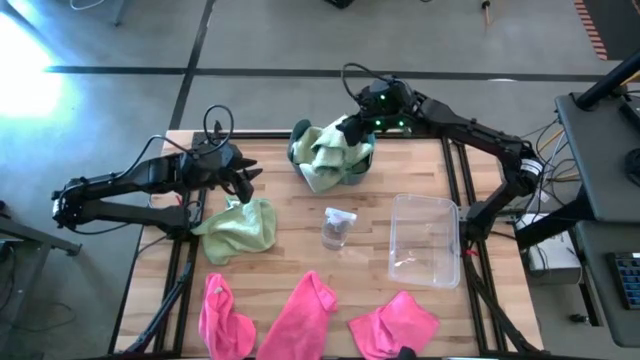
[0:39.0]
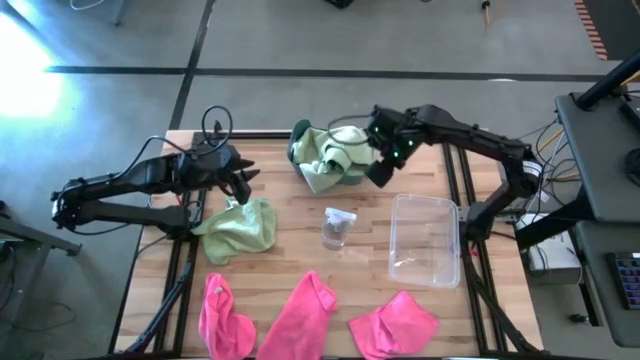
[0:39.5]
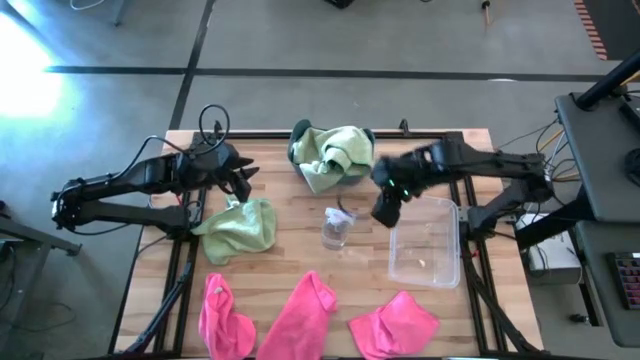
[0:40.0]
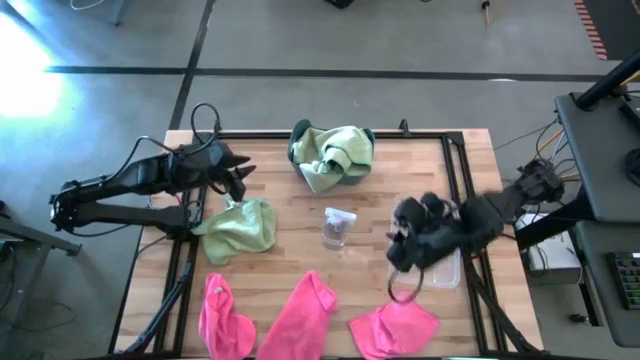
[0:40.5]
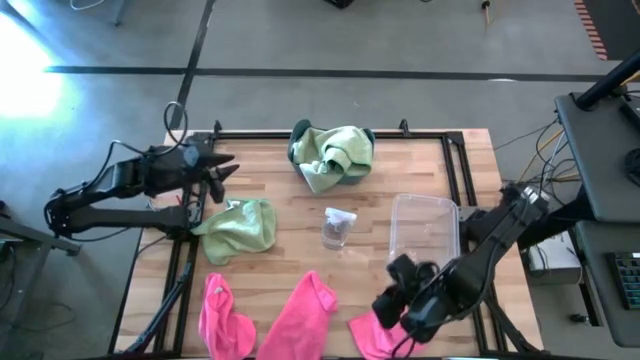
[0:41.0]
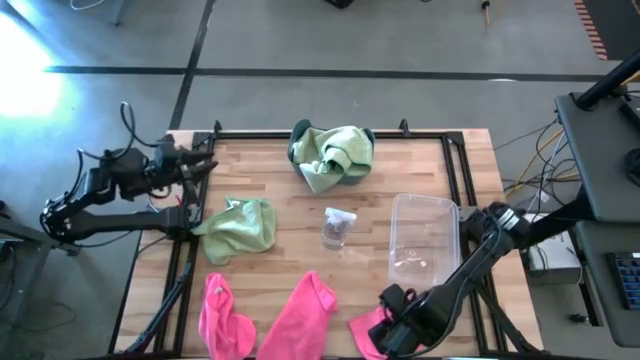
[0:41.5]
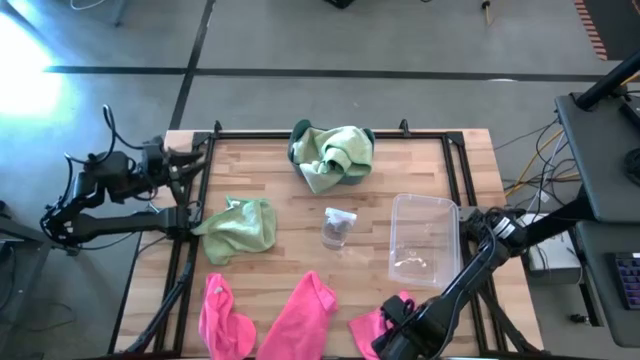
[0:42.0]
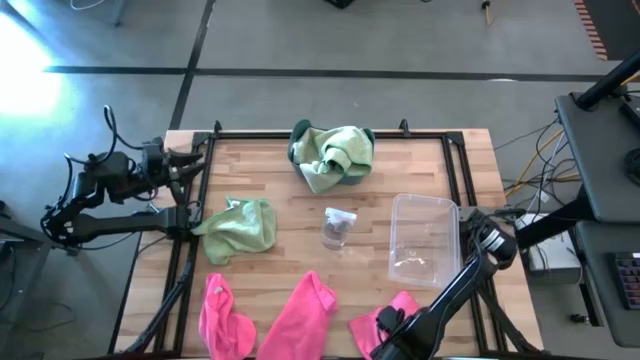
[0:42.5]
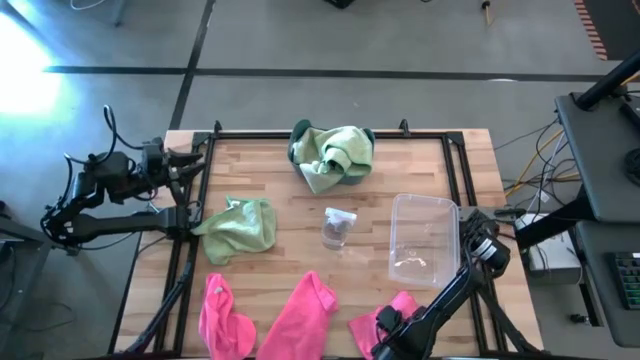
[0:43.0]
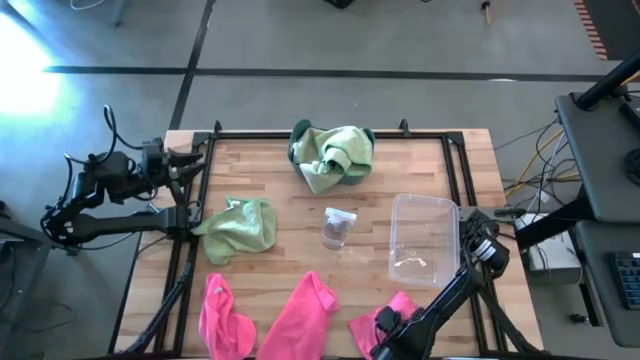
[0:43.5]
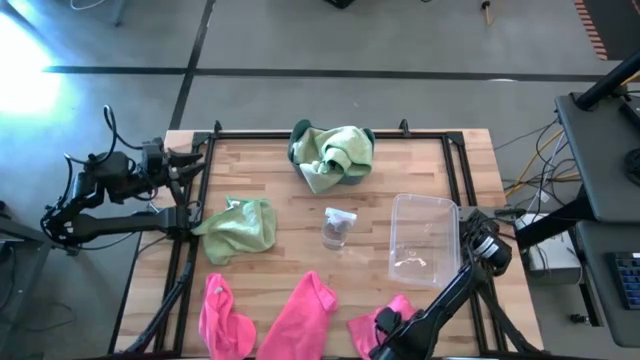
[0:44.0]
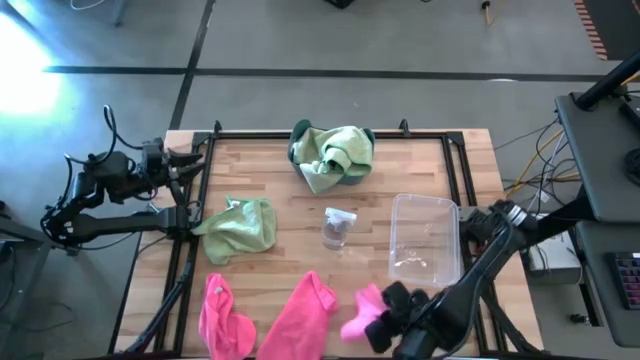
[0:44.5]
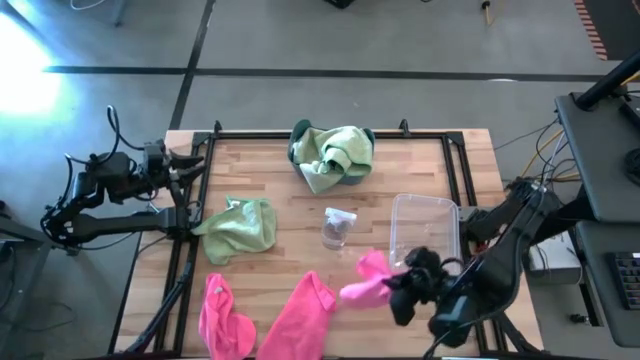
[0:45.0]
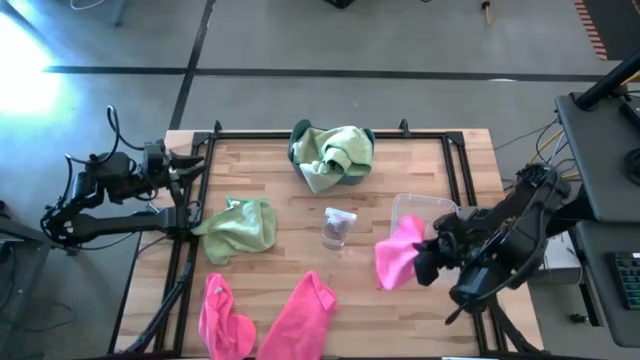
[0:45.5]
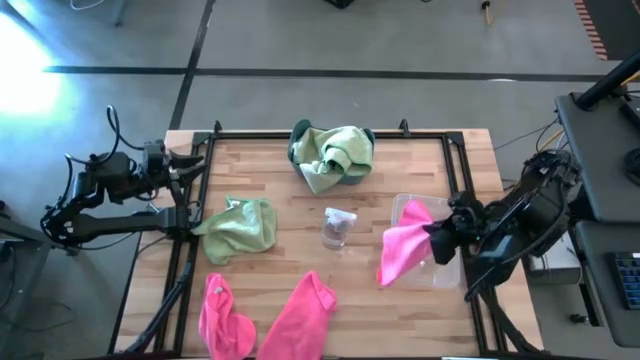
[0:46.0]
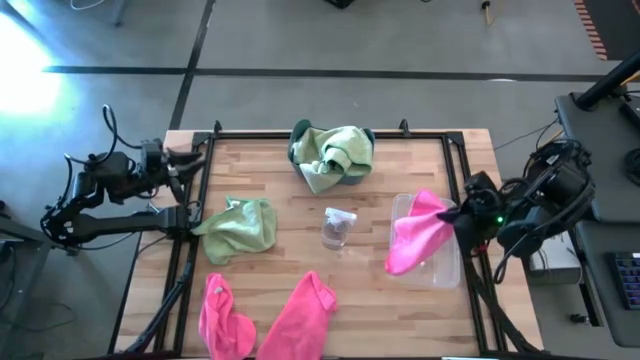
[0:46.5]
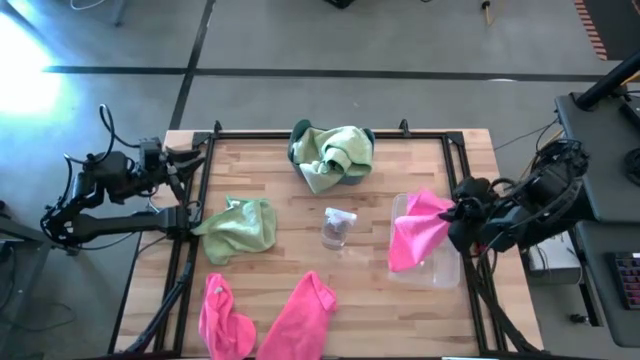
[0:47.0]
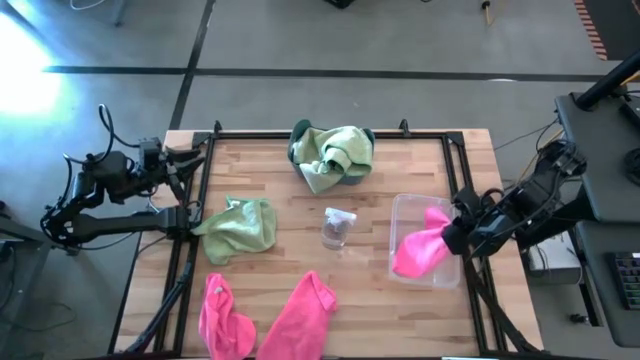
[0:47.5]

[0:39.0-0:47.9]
Task: Sort microfiber towel by color & place in baskets
Put the right pink microfiber towel into the transparent bin

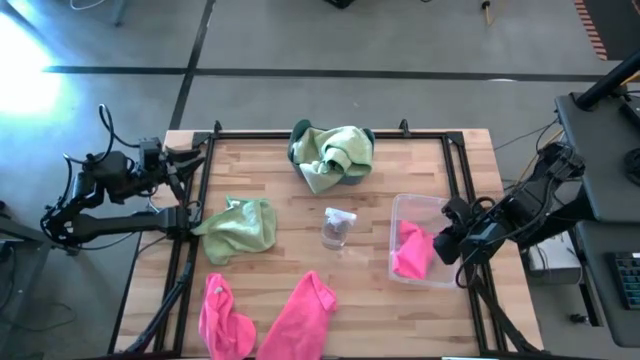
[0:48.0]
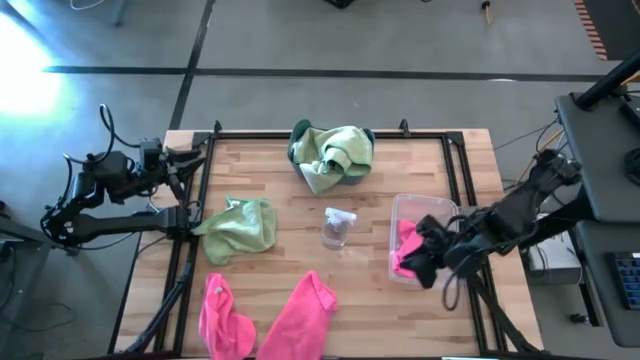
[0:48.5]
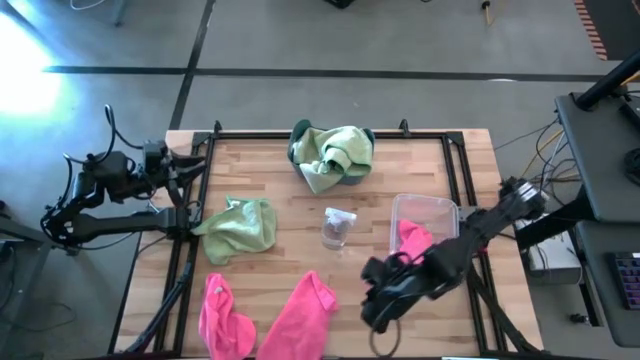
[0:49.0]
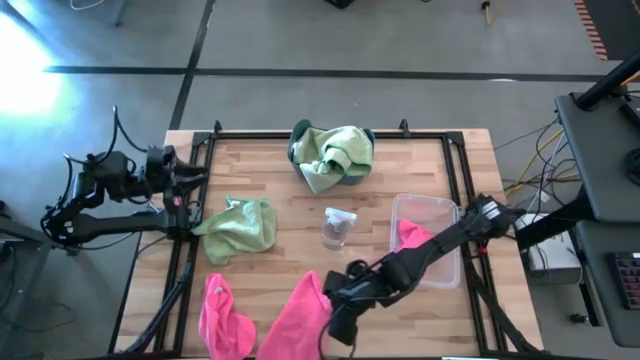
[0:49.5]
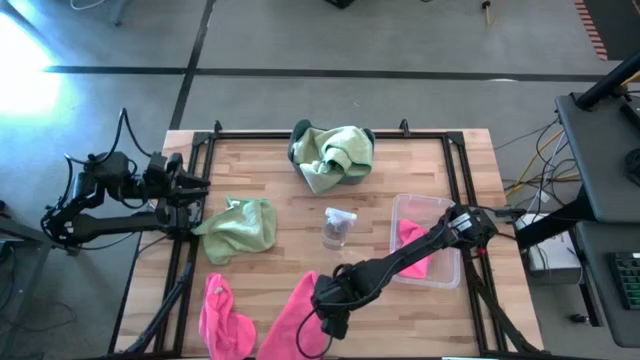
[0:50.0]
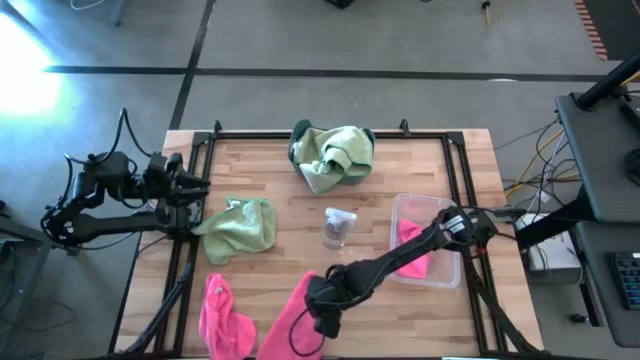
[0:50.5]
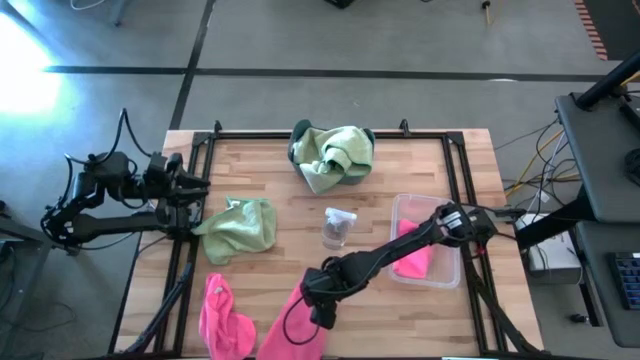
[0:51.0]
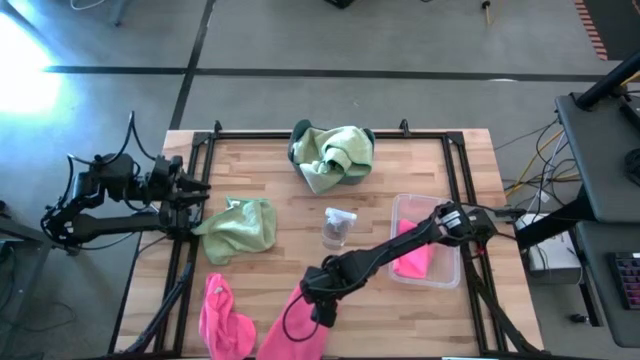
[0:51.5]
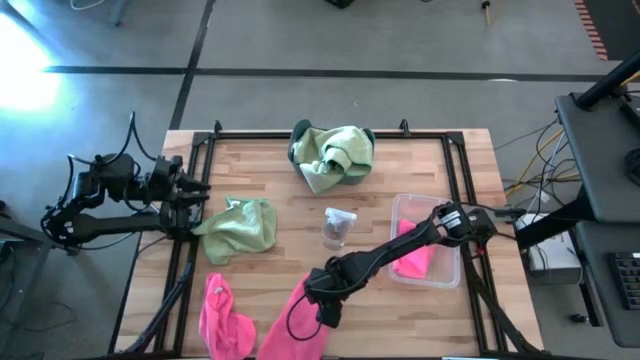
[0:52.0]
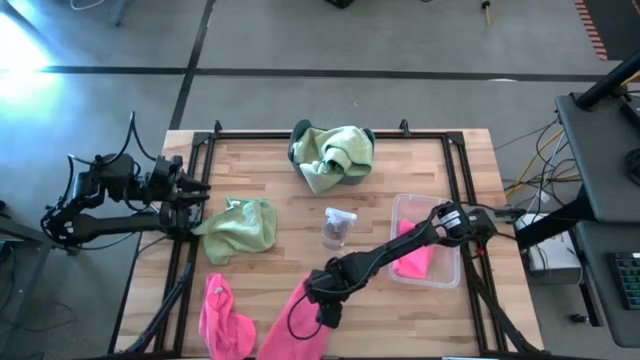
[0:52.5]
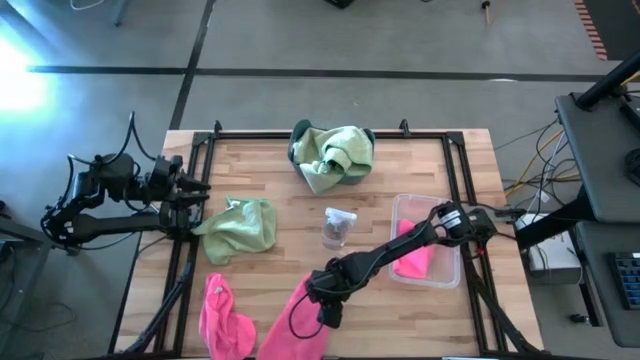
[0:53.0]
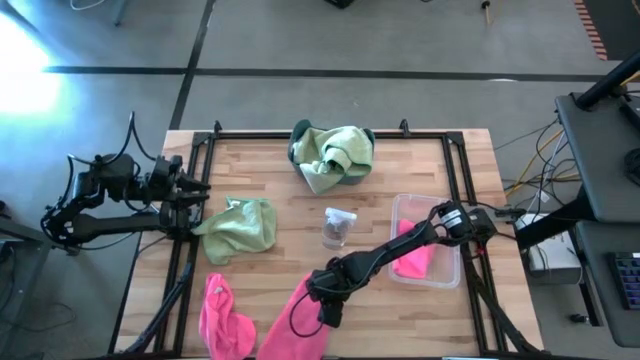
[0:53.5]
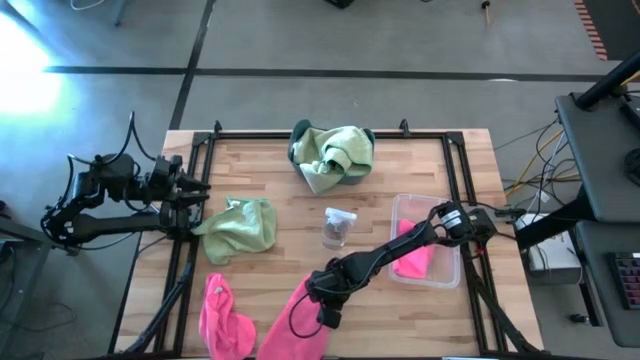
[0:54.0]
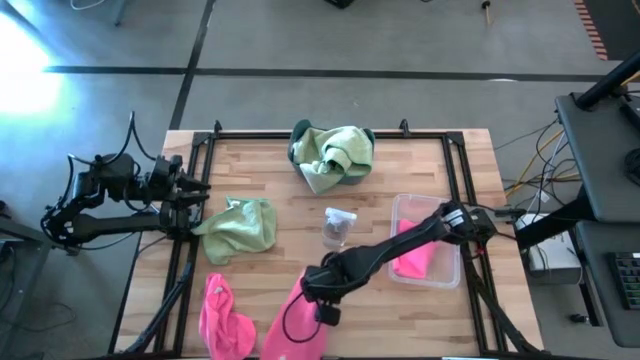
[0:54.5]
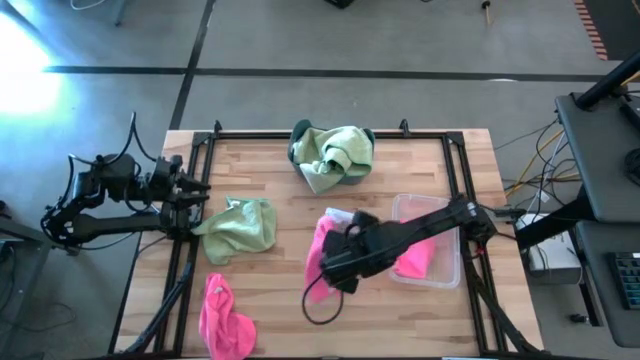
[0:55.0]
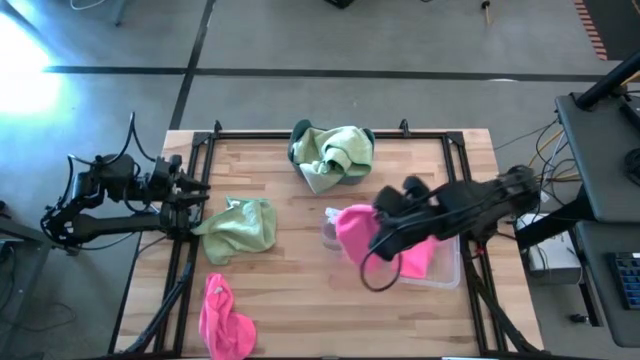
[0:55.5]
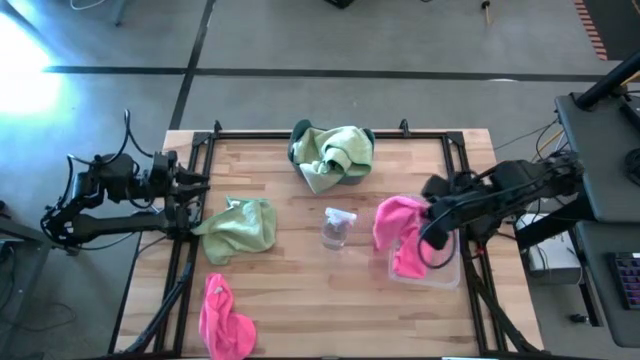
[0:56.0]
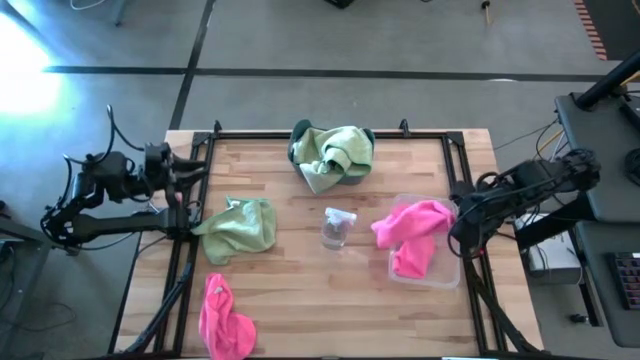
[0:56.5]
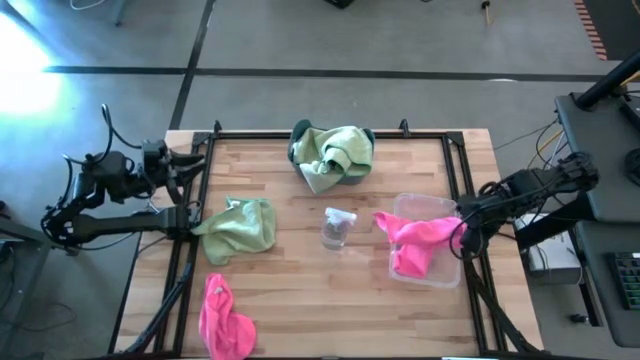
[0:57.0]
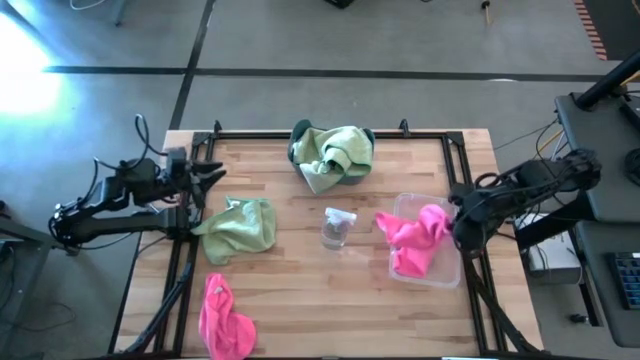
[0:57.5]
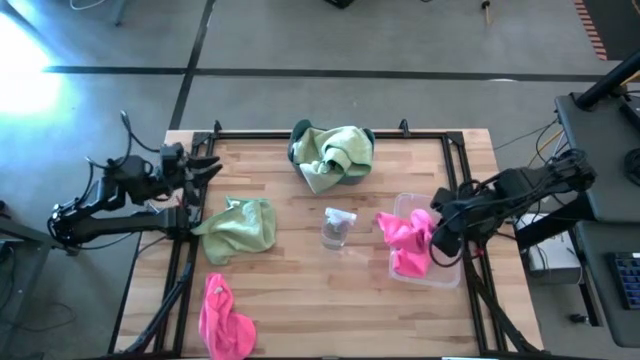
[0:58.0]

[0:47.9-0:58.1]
Put the middle pink microfiber towel into the transparent bin

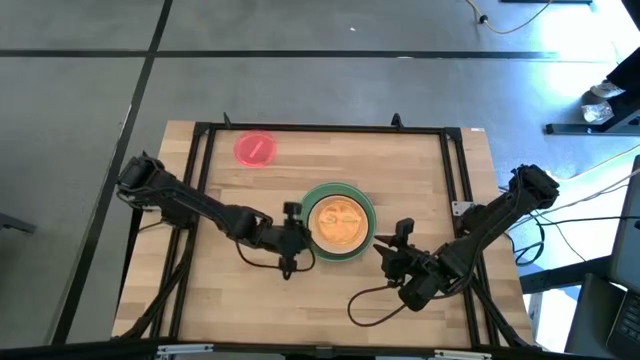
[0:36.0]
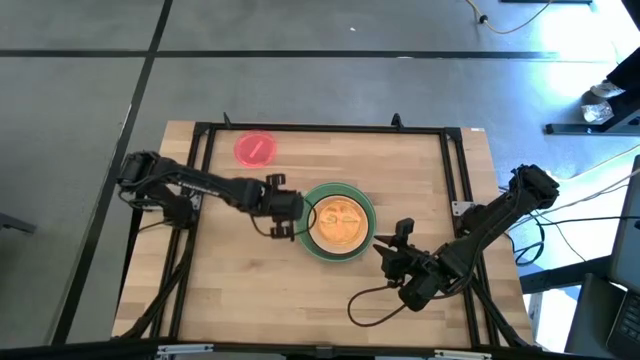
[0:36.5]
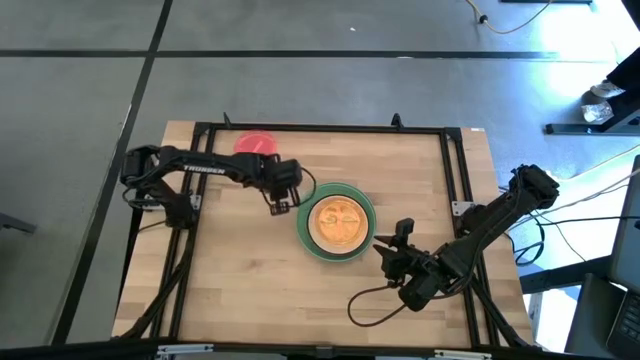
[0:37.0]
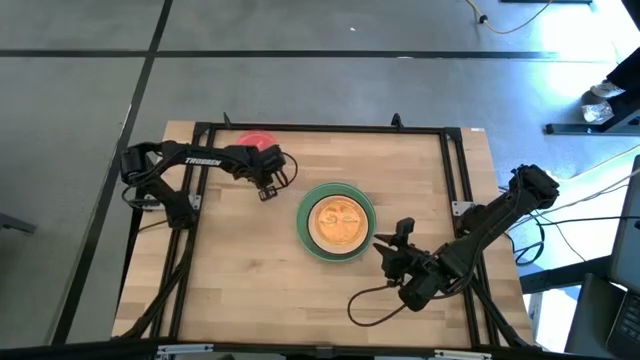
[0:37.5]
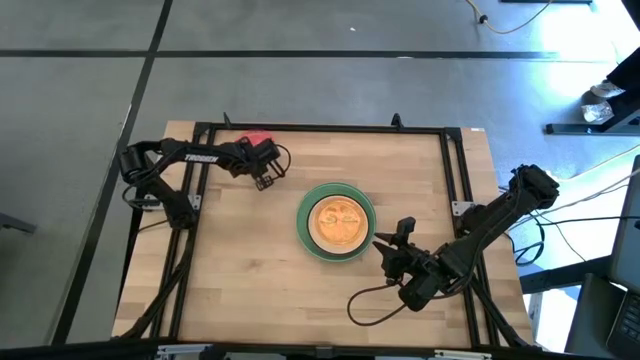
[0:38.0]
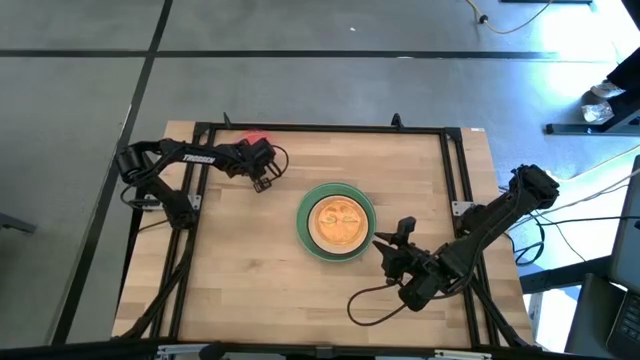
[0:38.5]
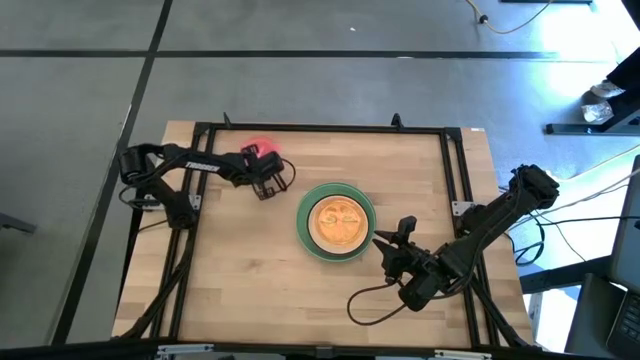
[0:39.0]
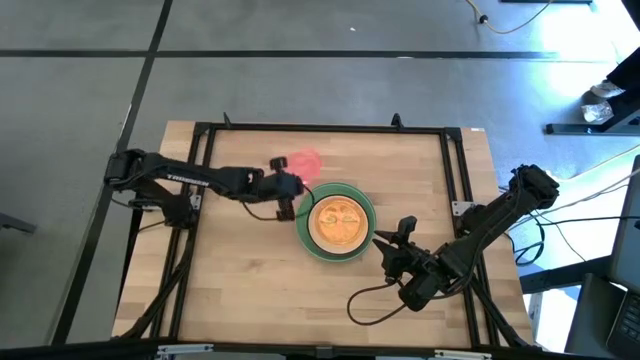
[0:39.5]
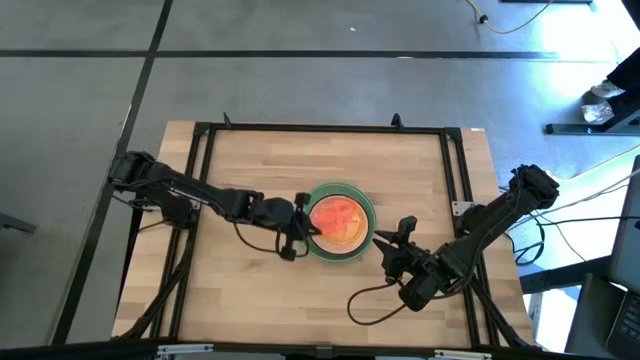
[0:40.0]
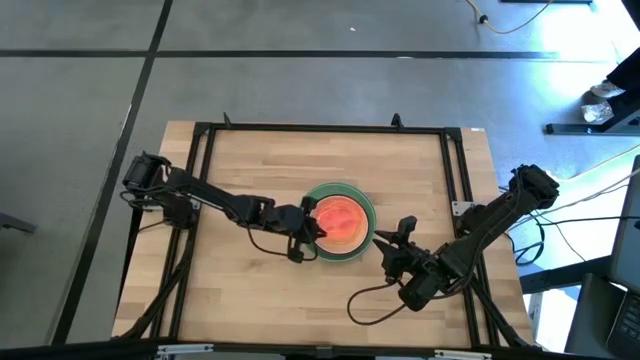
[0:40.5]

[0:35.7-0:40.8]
Task: Stack plastic plates
Stack the transparent pink plate on top of the transparent orange plate
